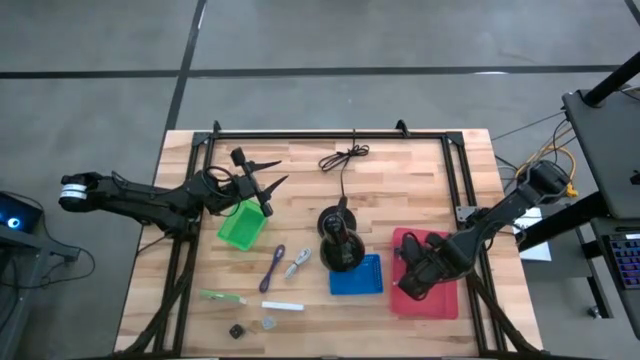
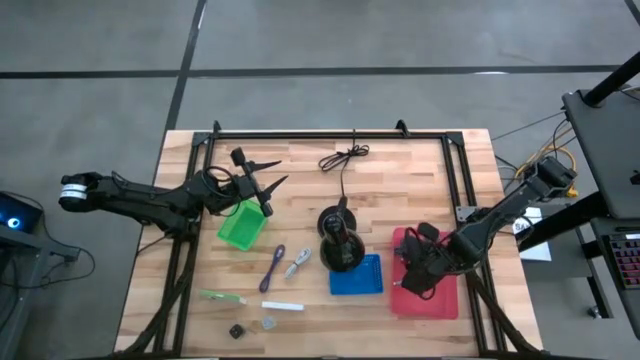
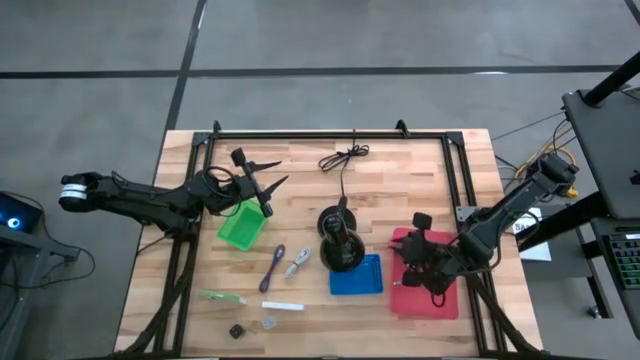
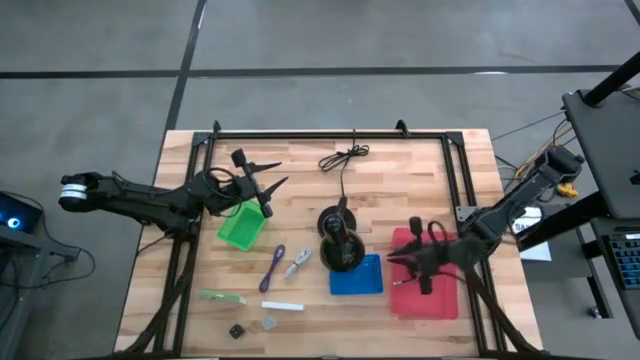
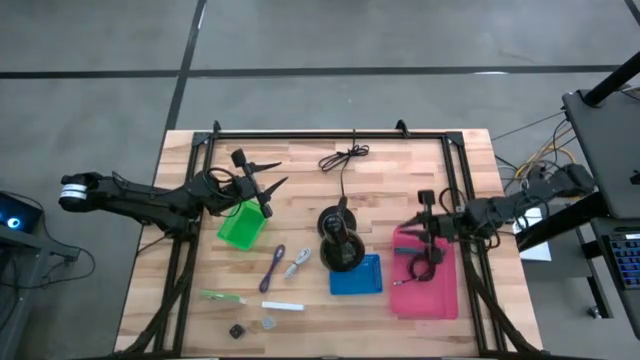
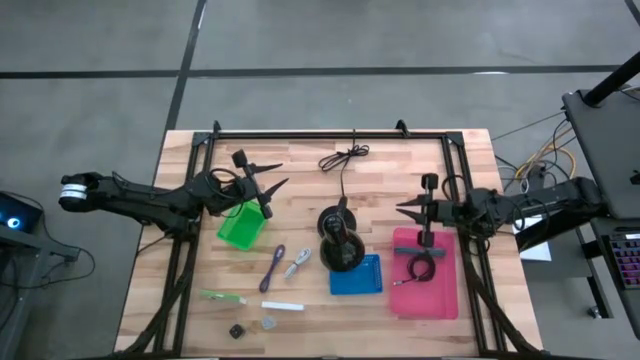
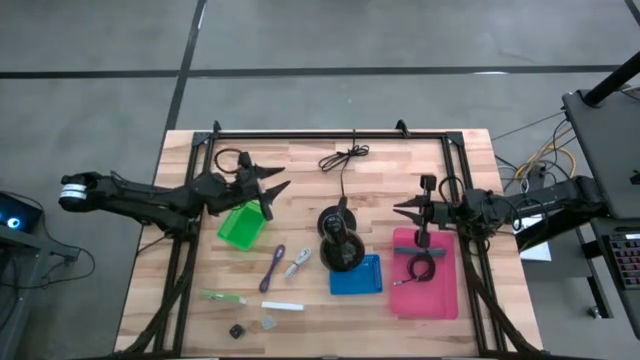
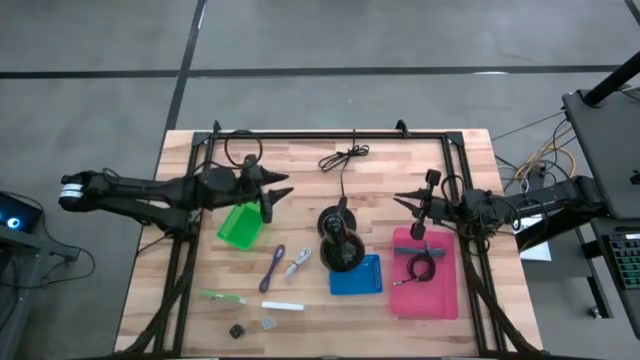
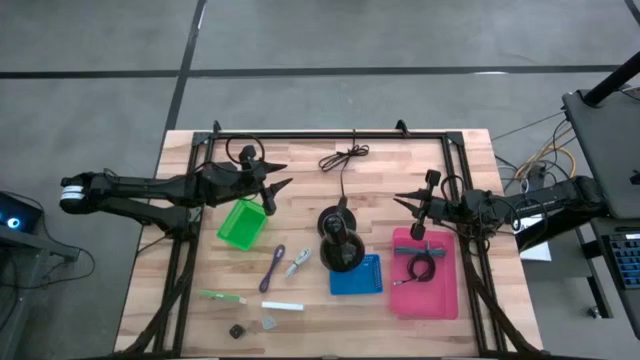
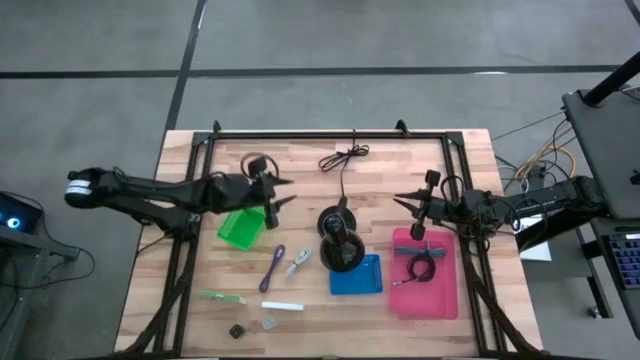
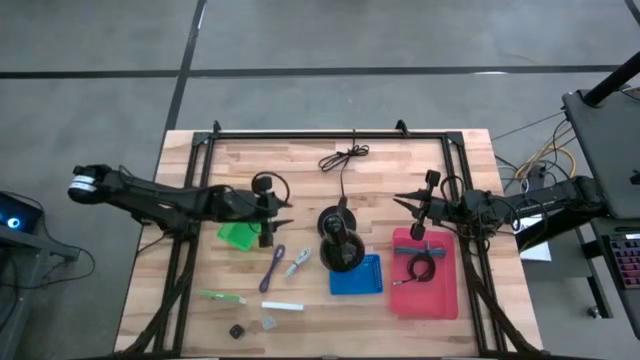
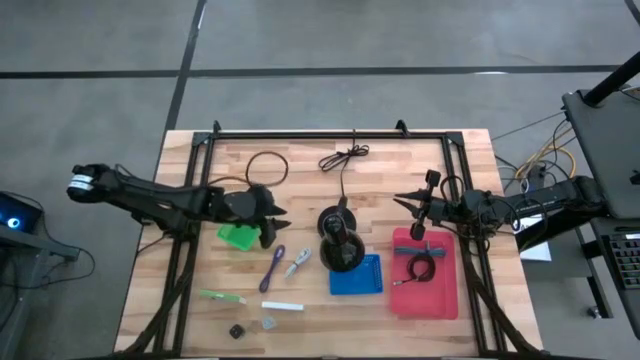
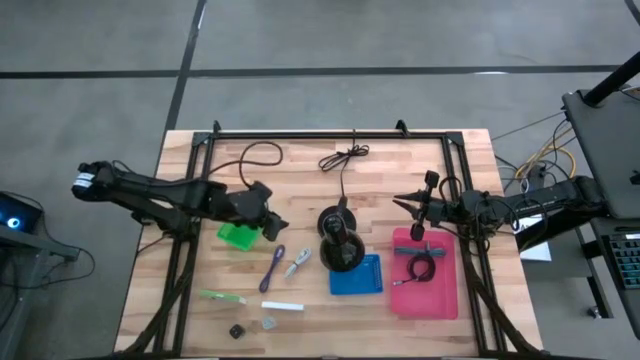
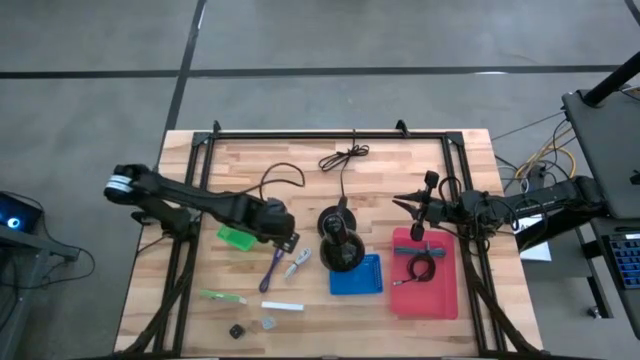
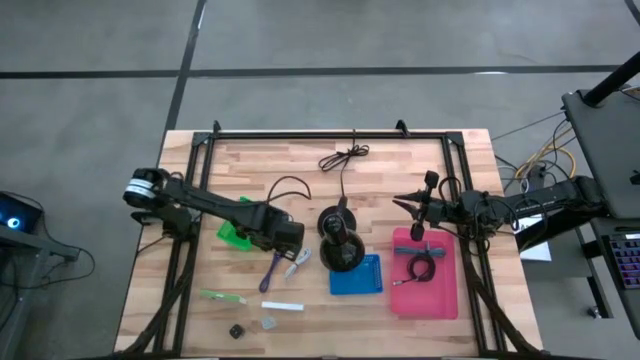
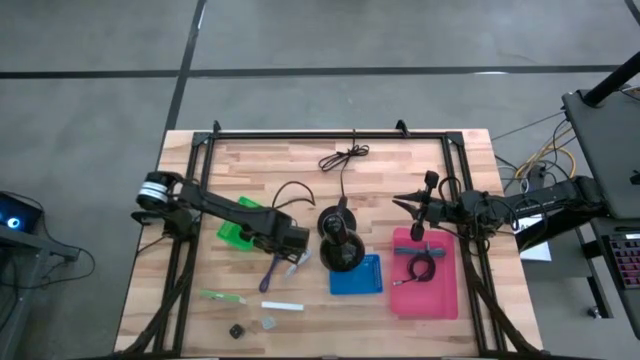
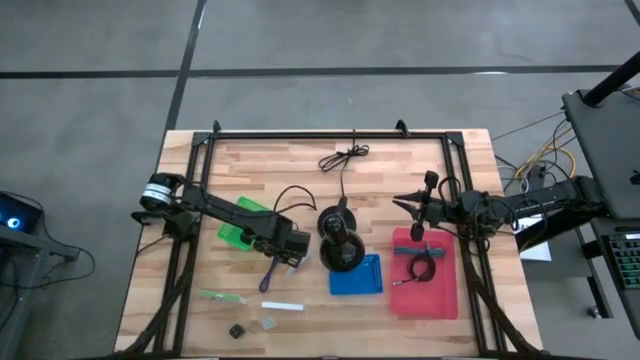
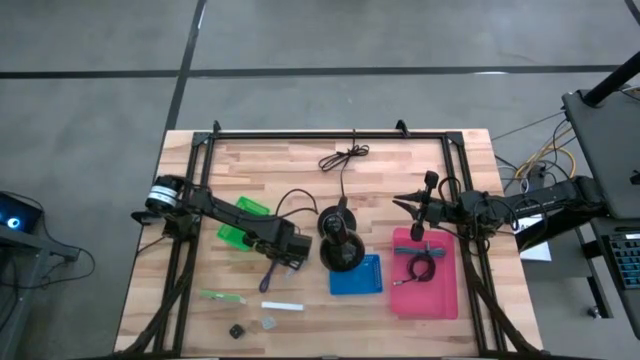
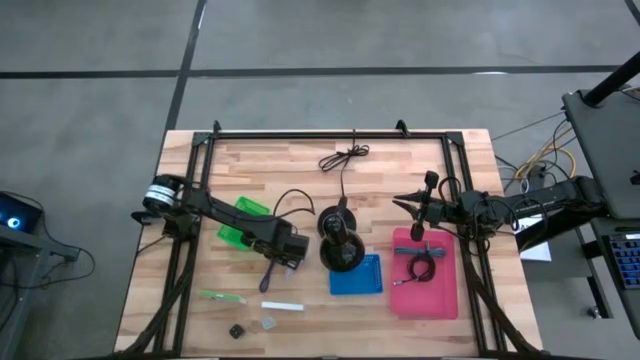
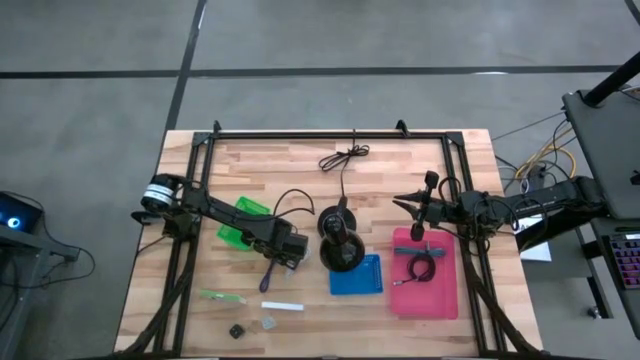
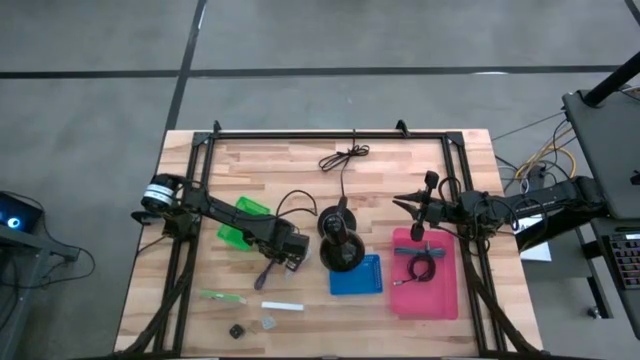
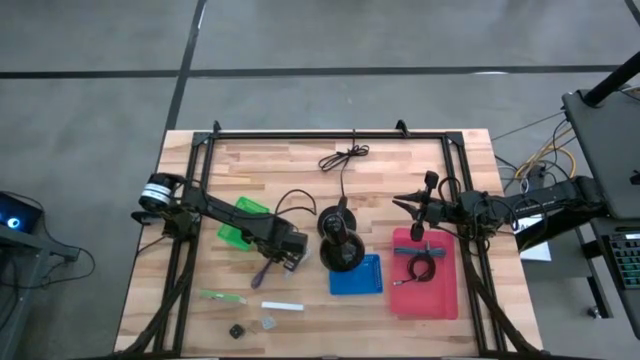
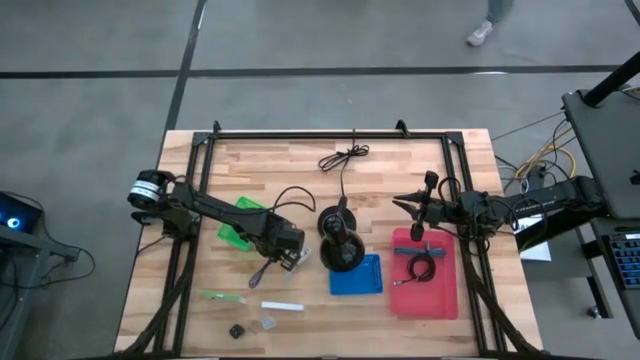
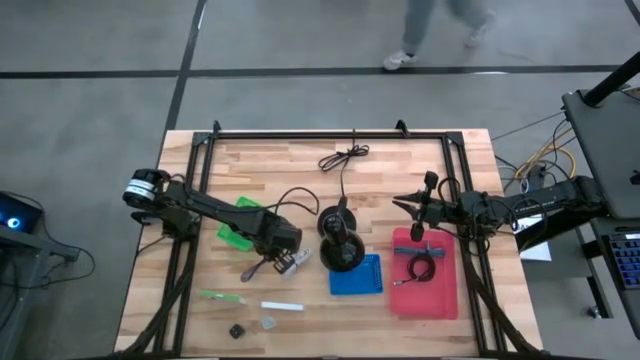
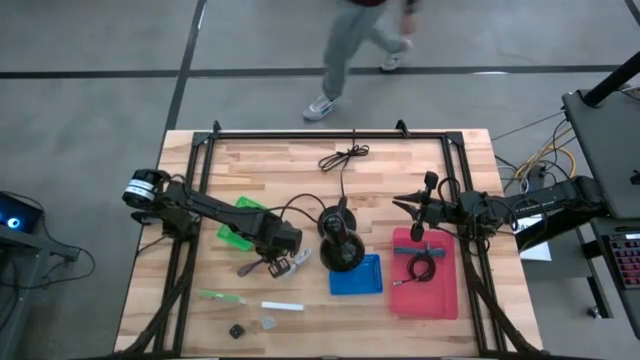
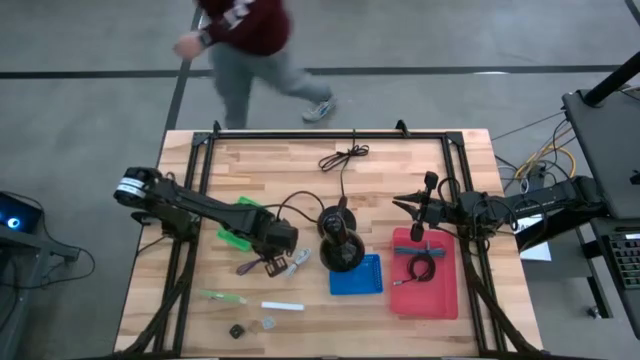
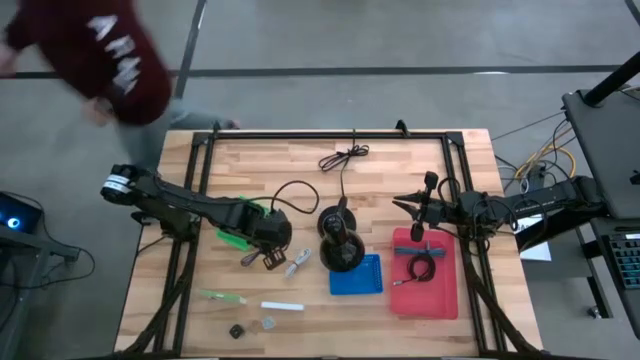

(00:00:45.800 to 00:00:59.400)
Task: Pick and place items into bin
Put the violet charger cable into the pink bin

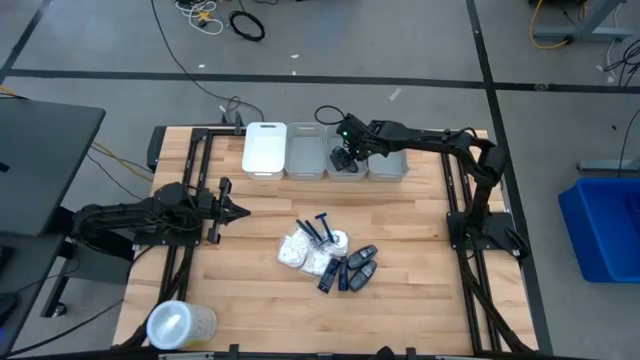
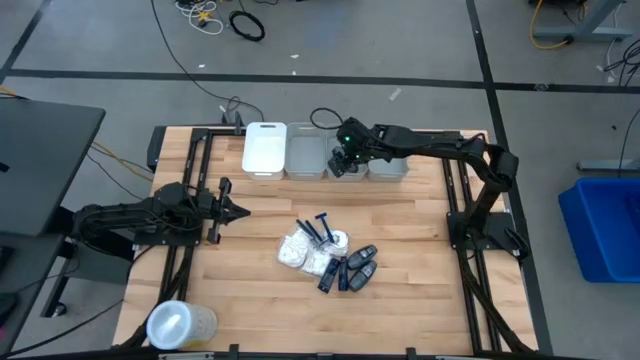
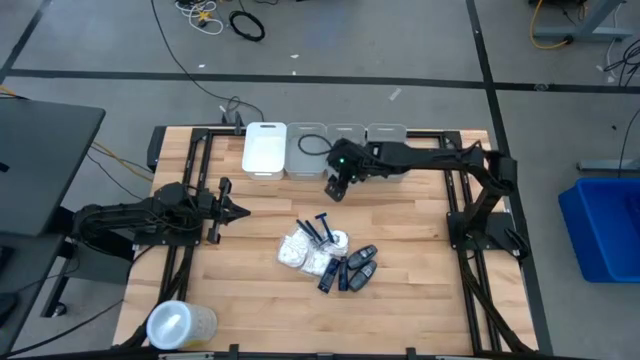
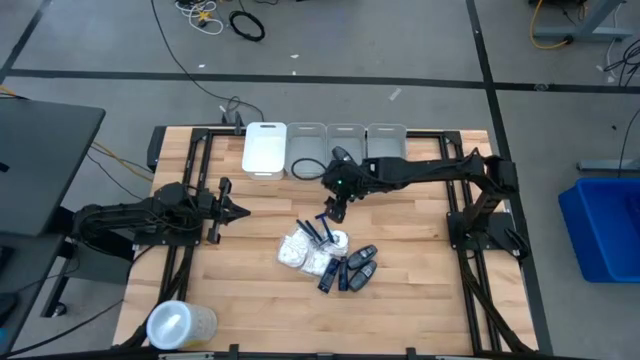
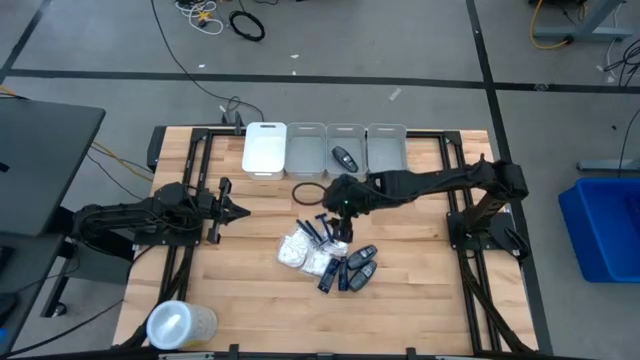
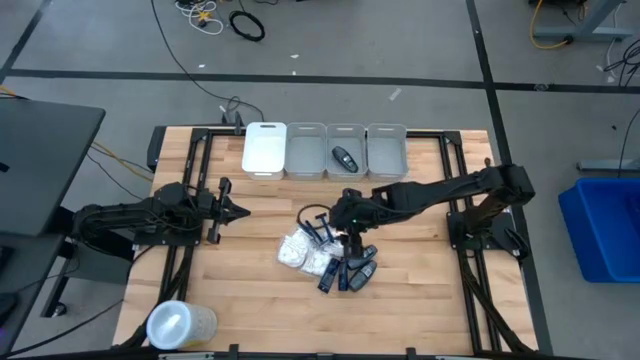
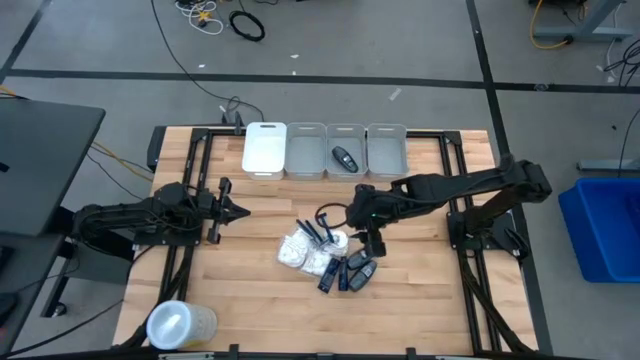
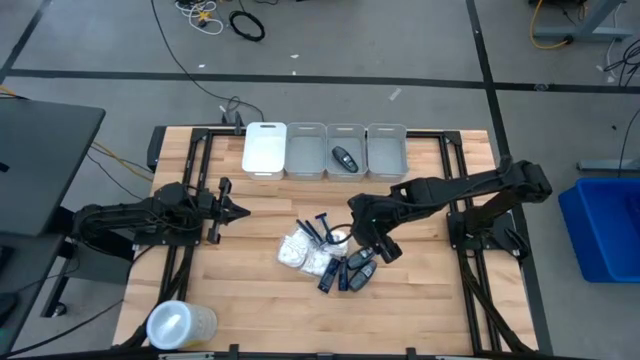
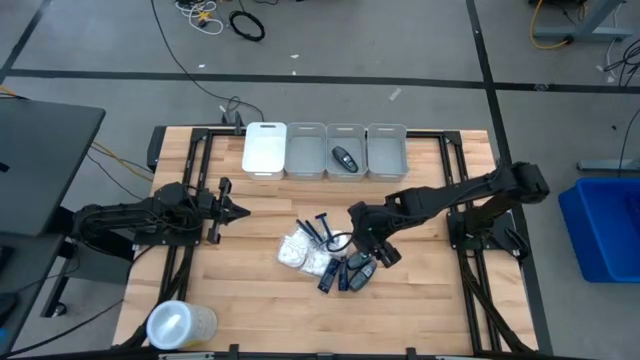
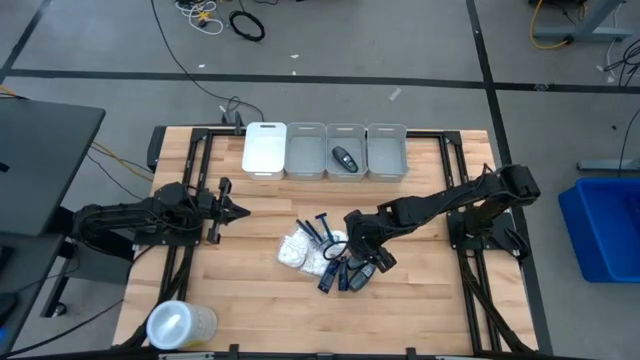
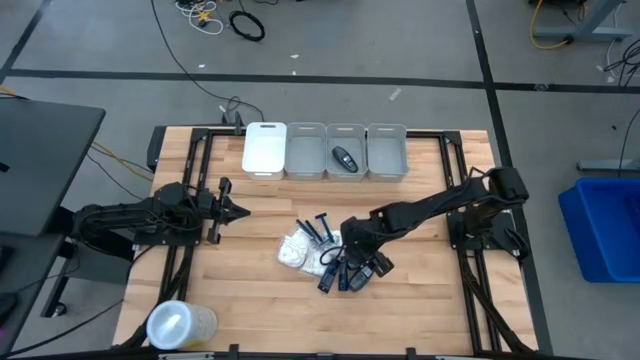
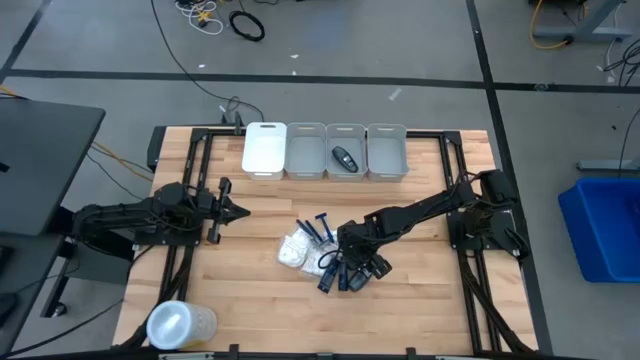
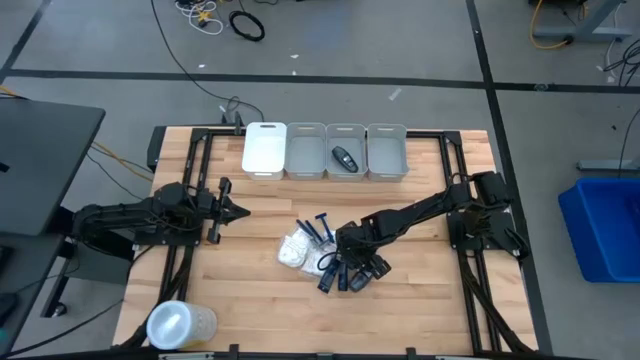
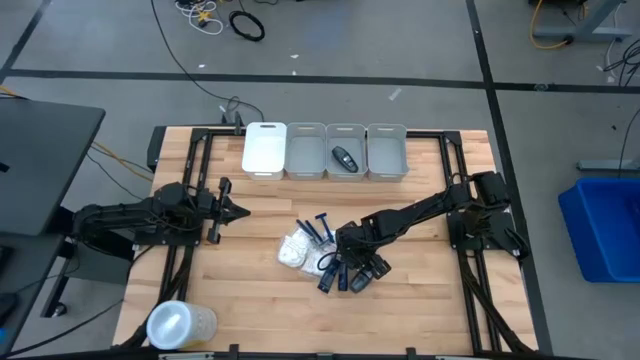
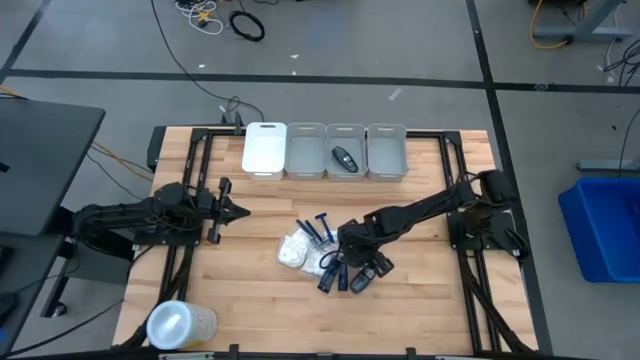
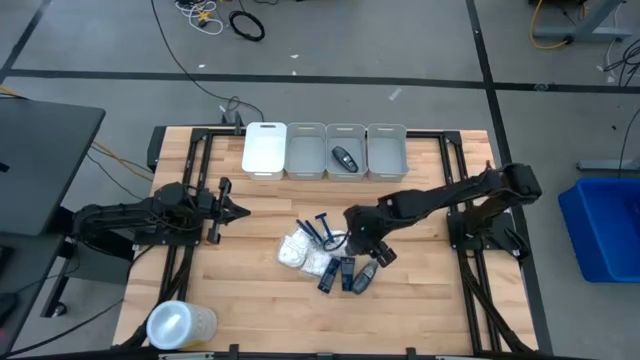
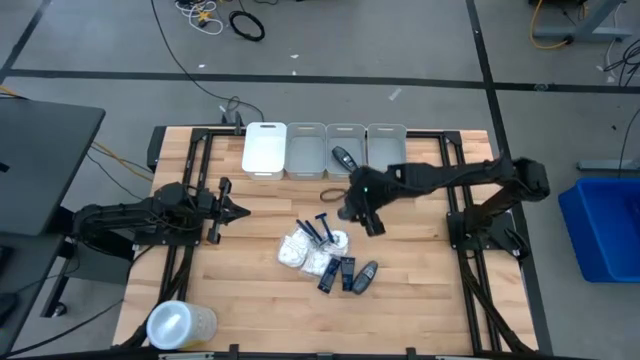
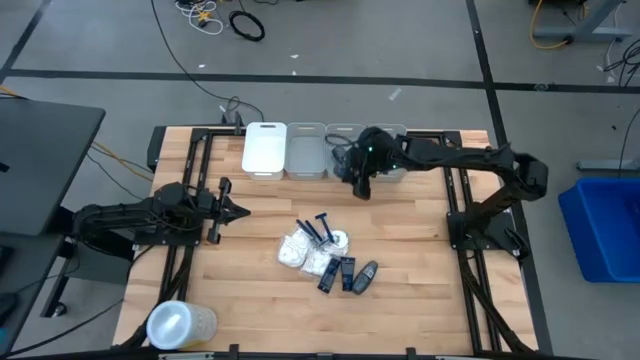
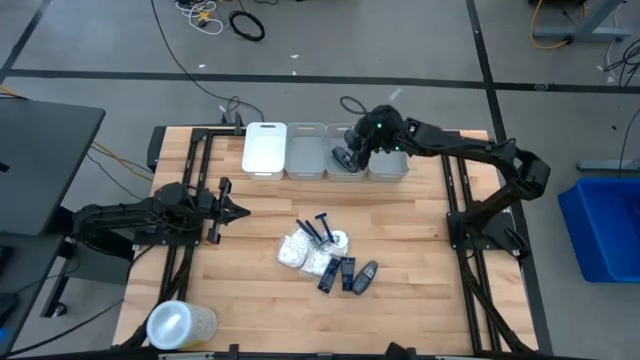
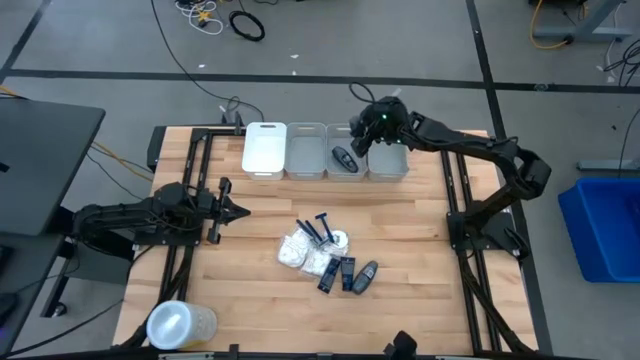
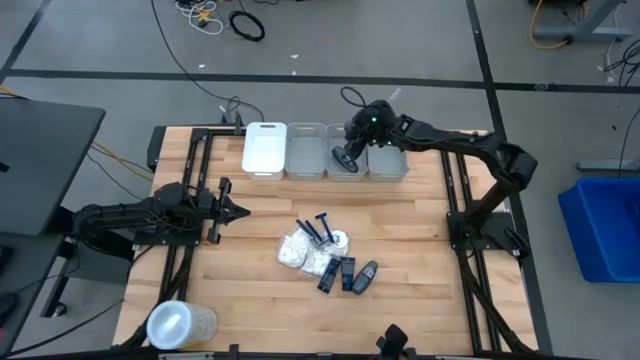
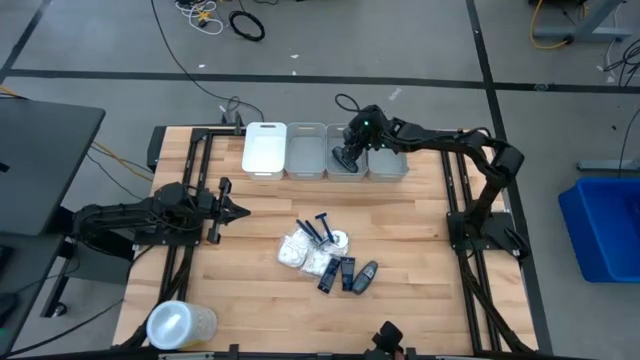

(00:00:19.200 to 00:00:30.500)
Task: Pick & Place Travel size toiletries
Put the gray deodorant into the middle gray bin
